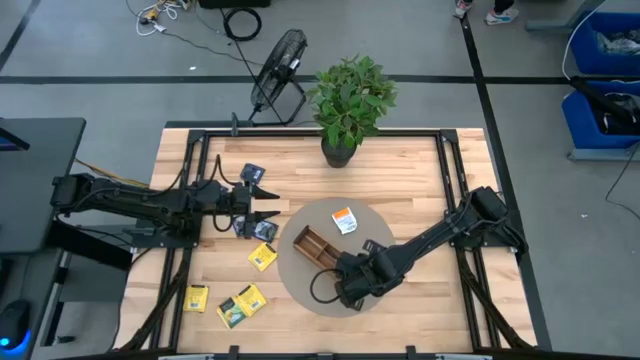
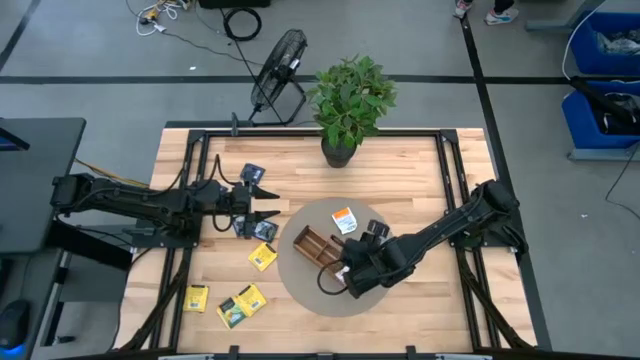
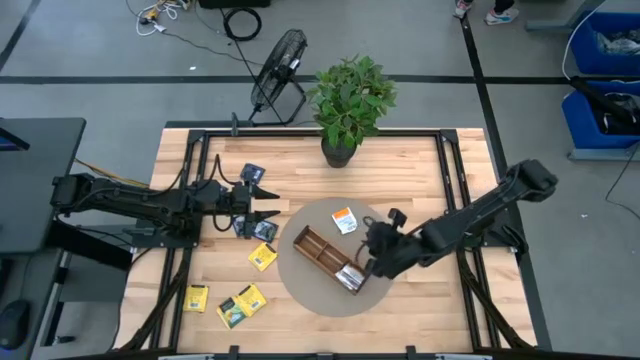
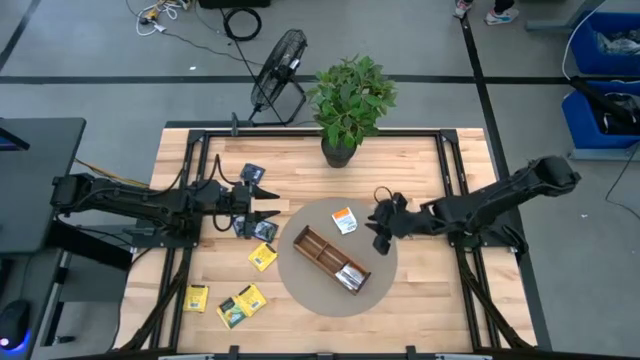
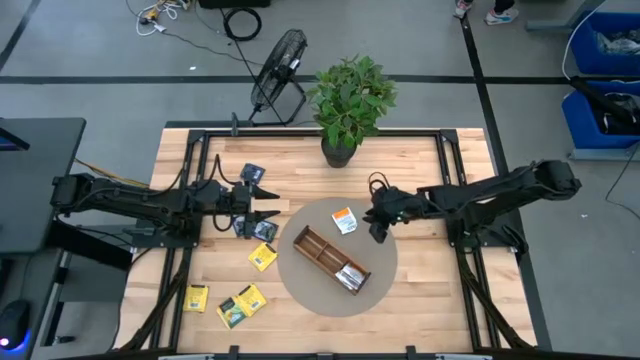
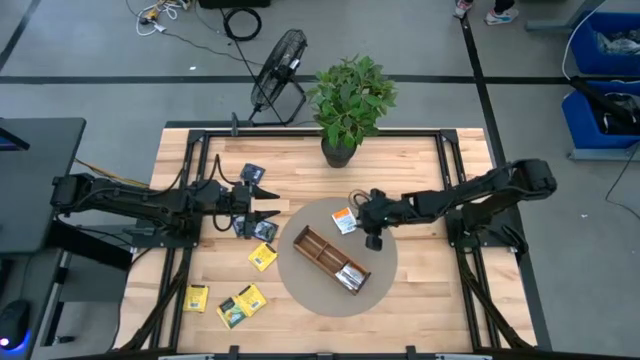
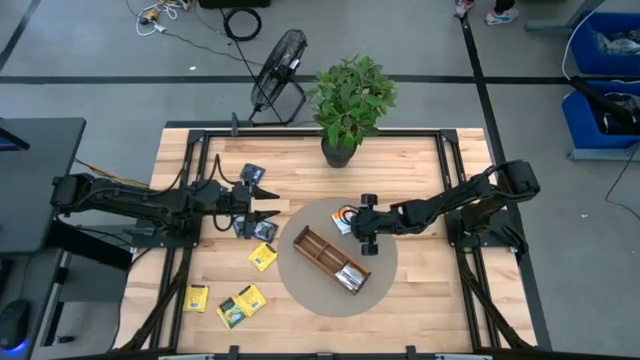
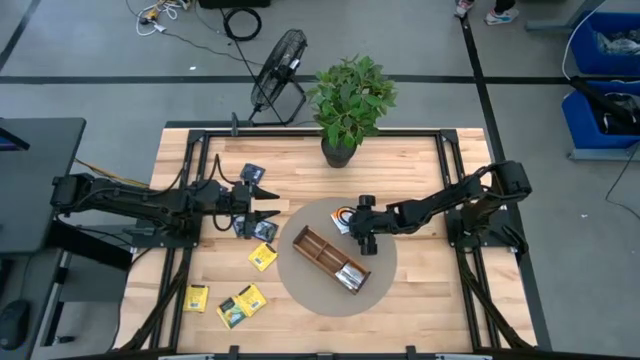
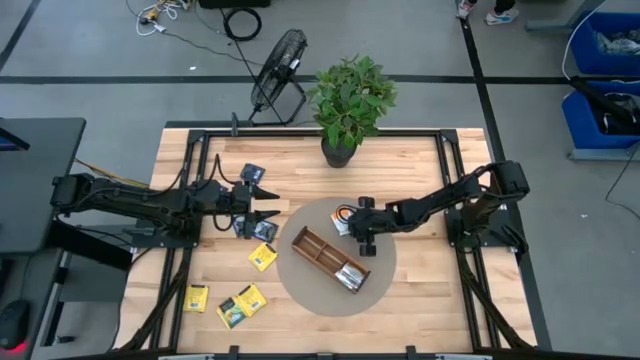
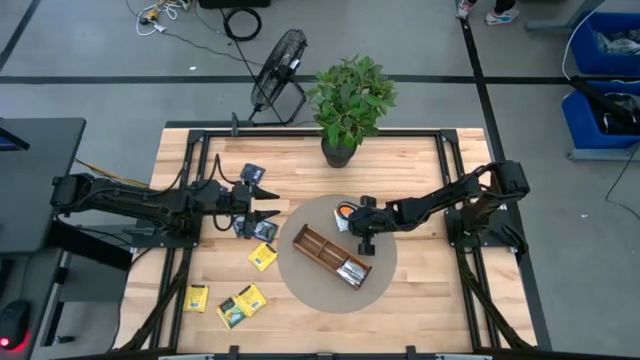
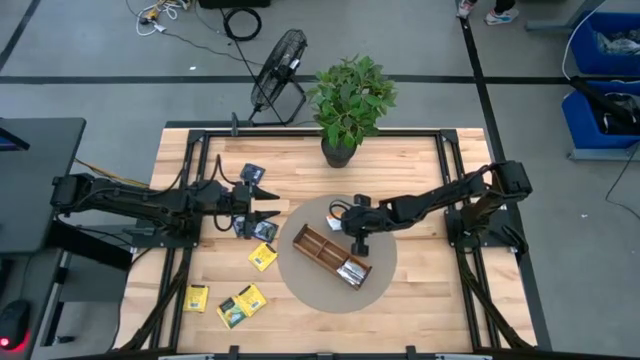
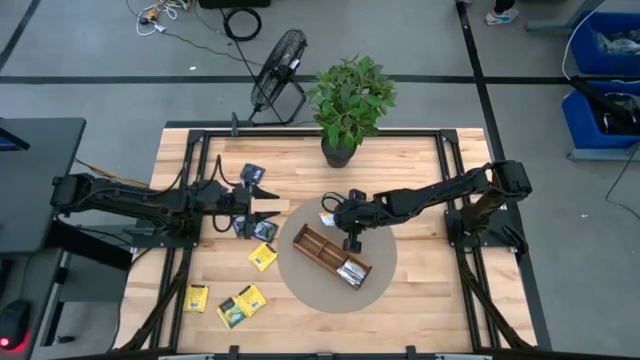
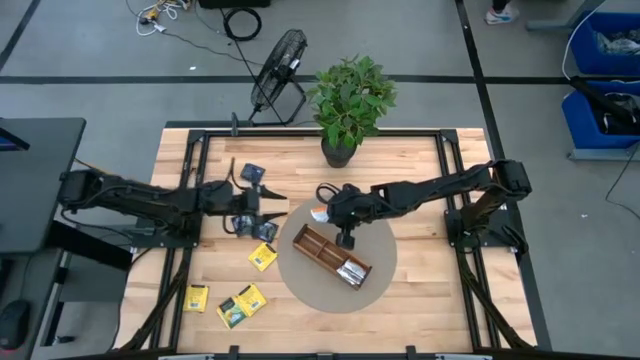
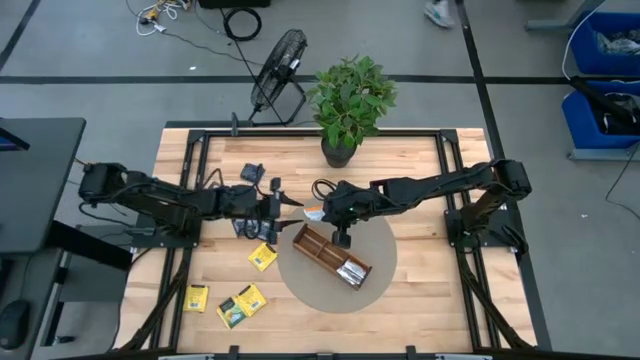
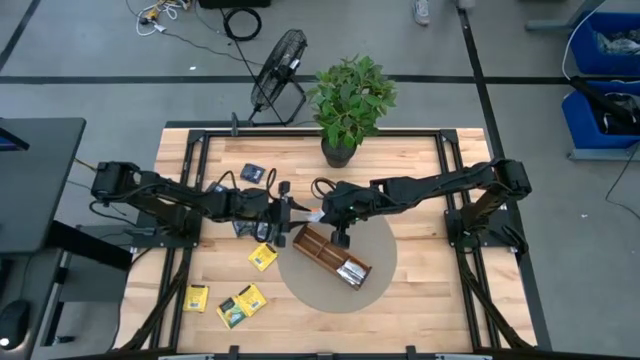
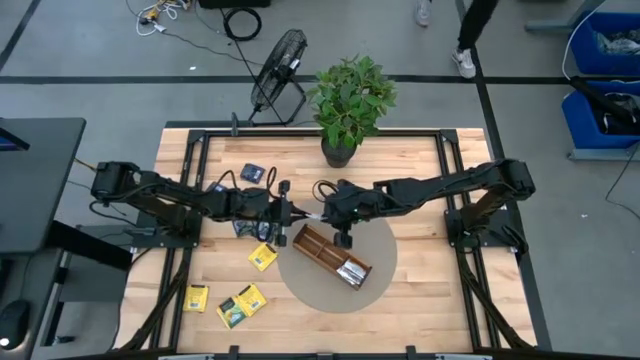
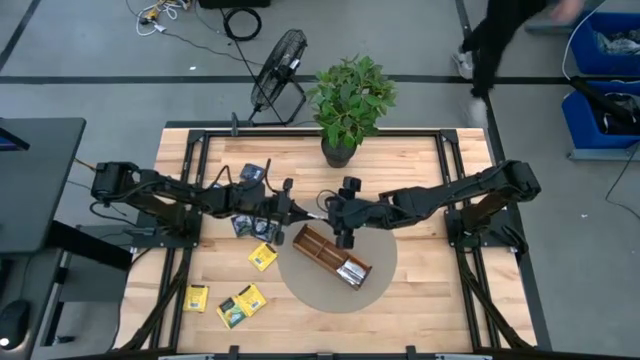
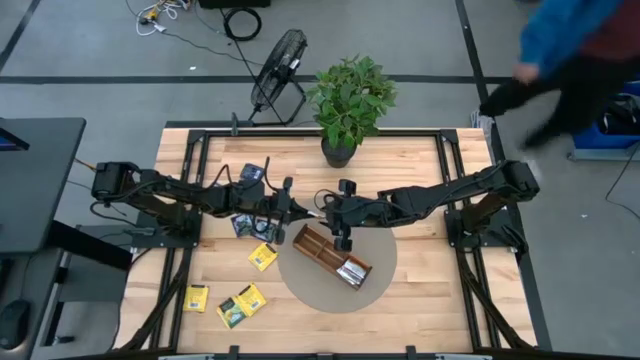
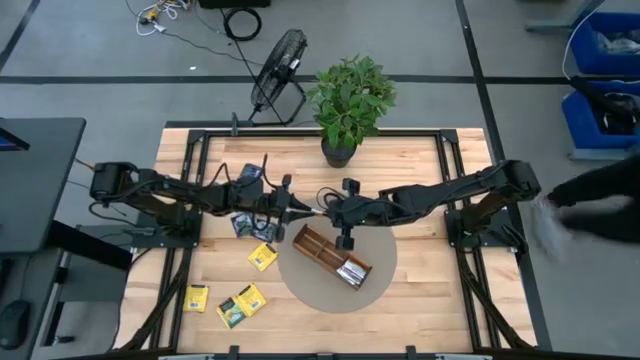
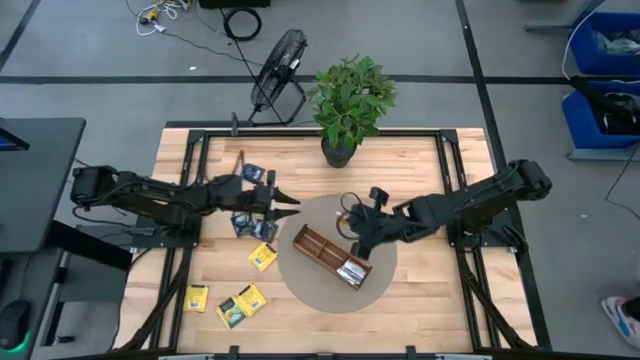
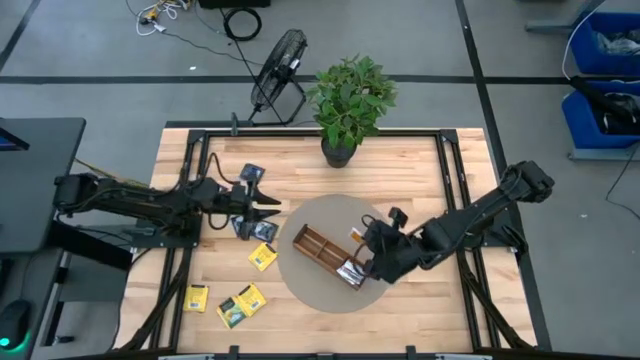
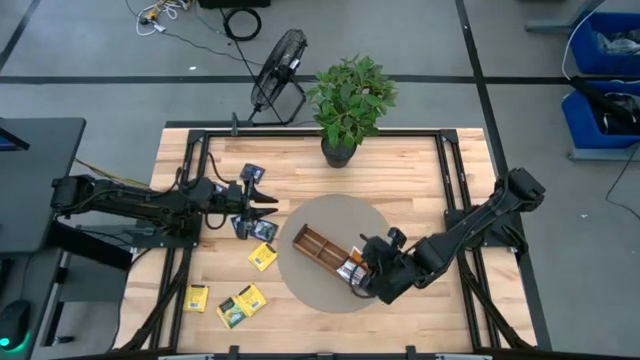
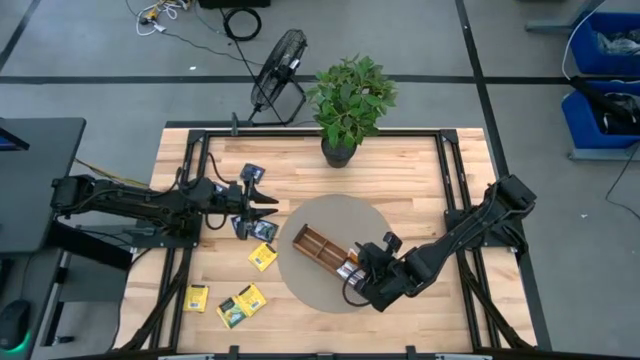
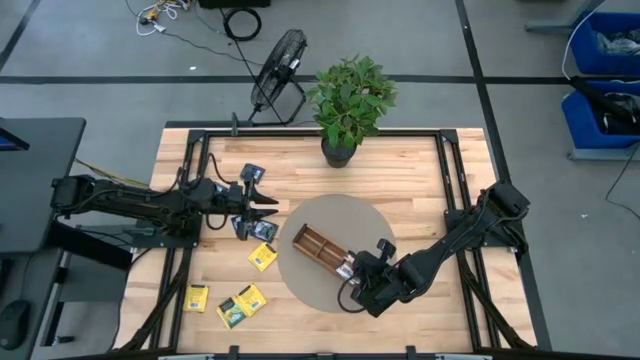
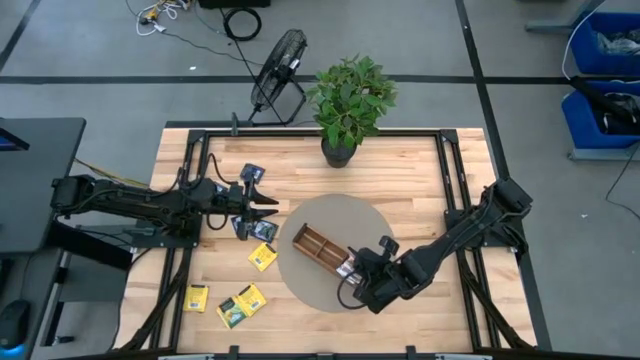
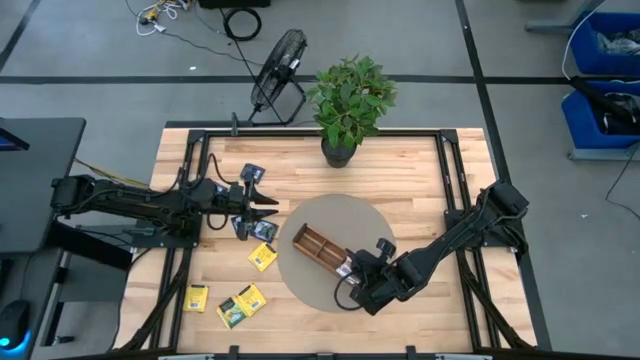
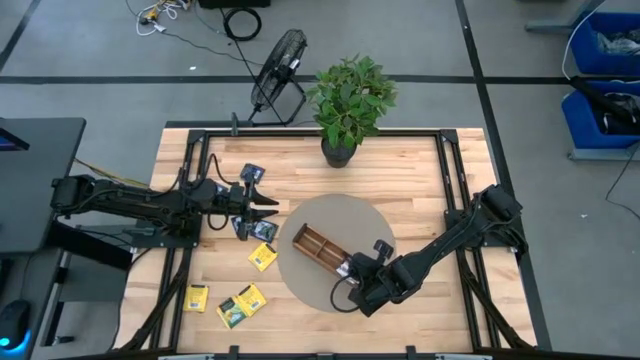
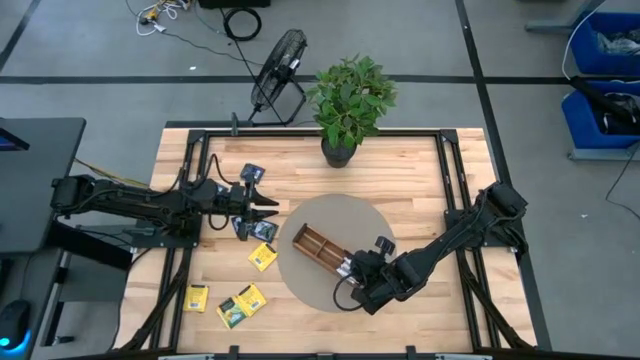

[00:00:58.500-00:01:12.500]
Task: Pick & Place Tea
Put the orange tea bag into the bottom section of the wooden organizer

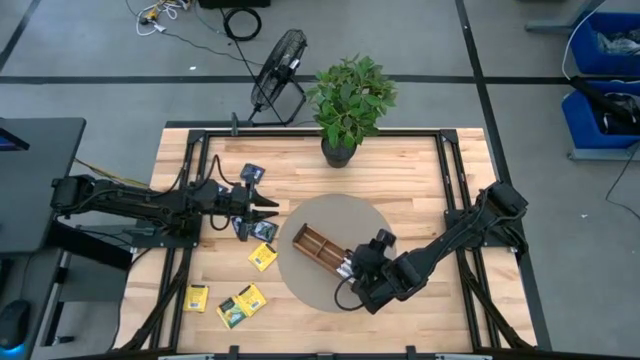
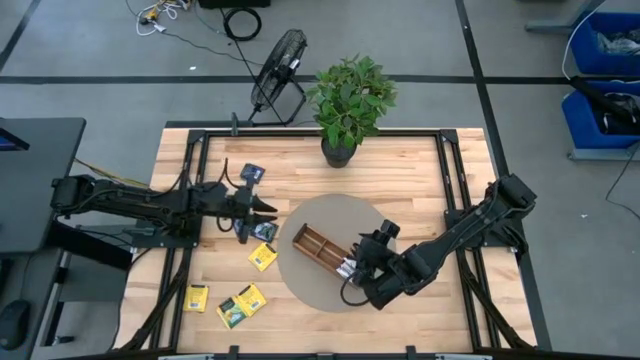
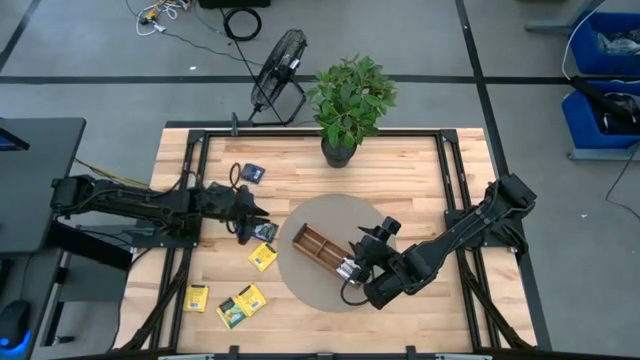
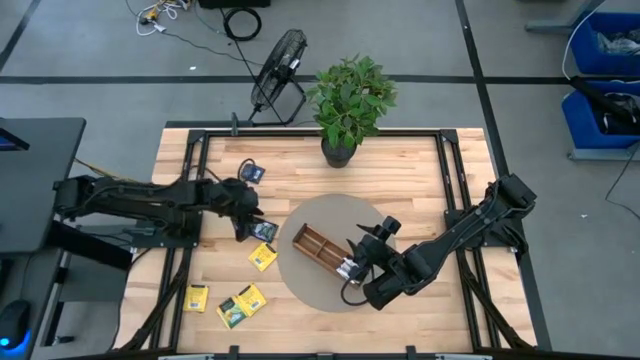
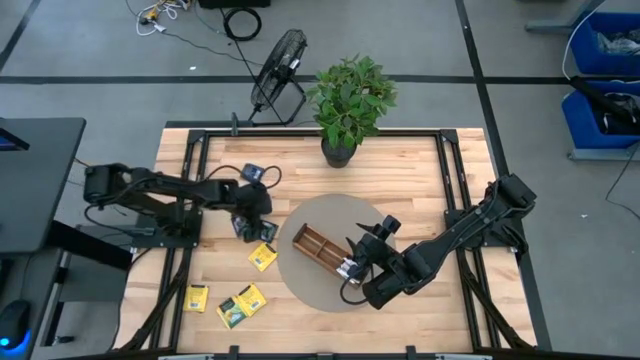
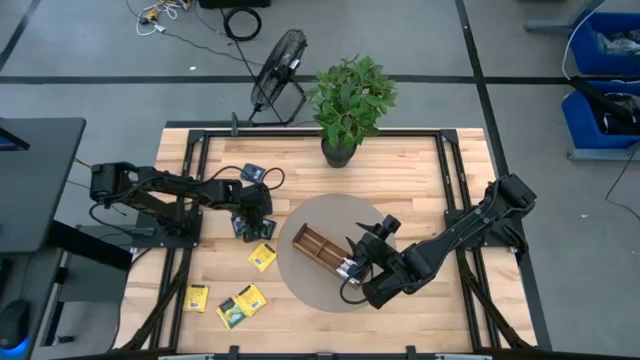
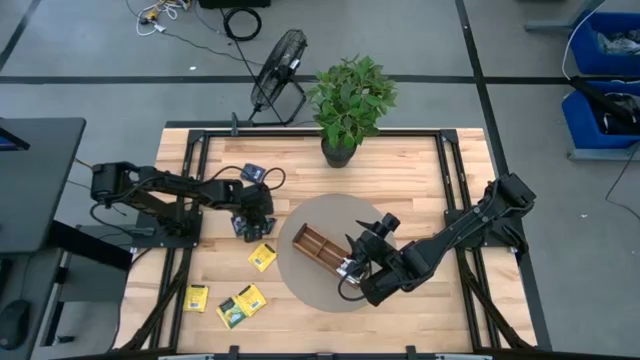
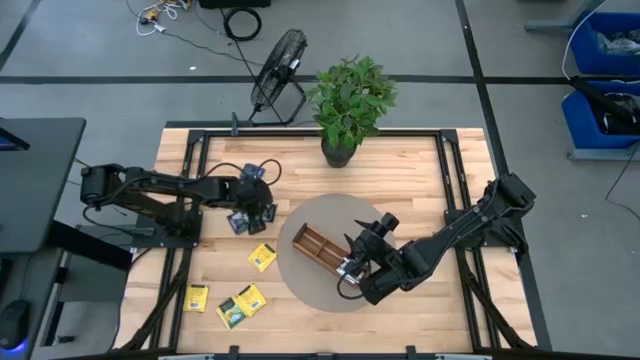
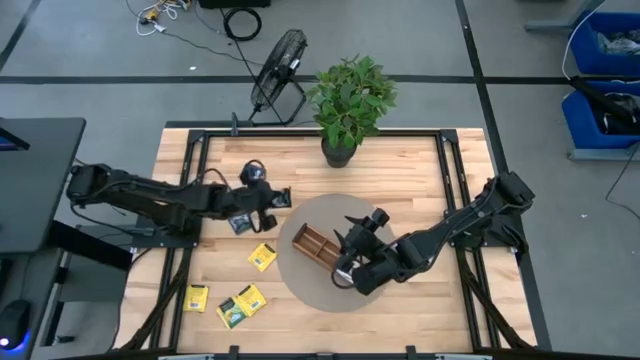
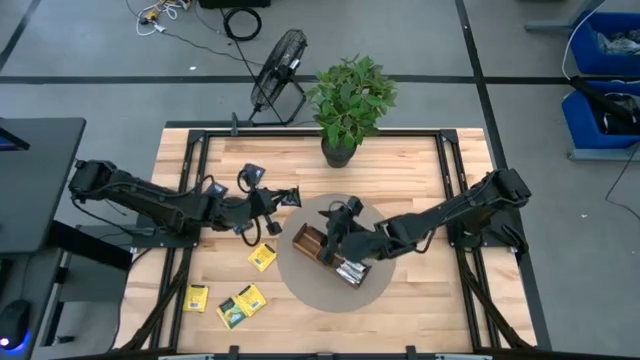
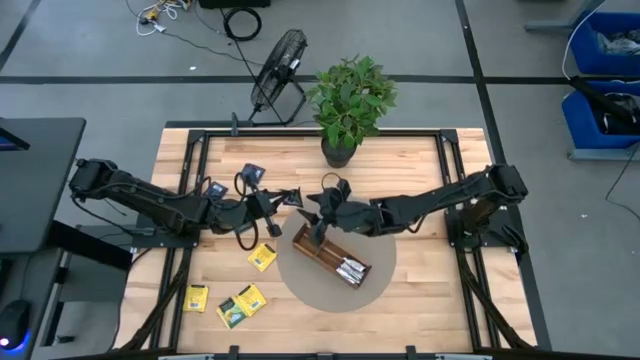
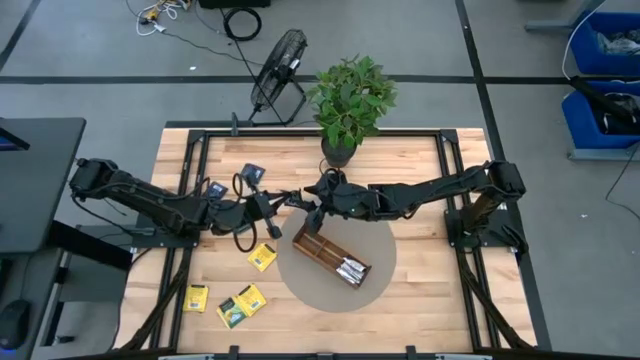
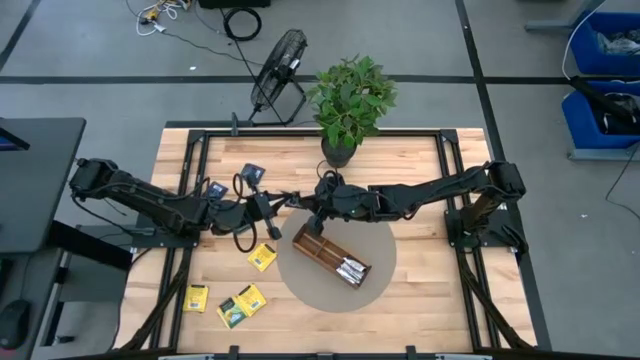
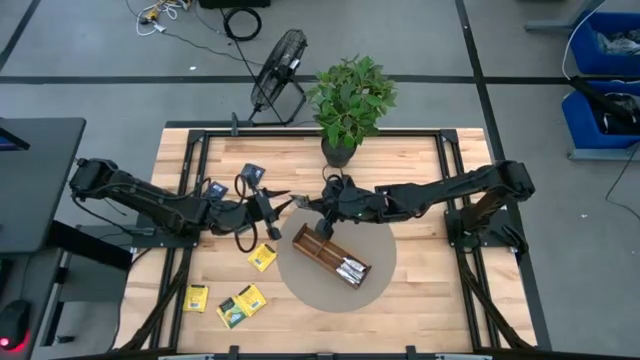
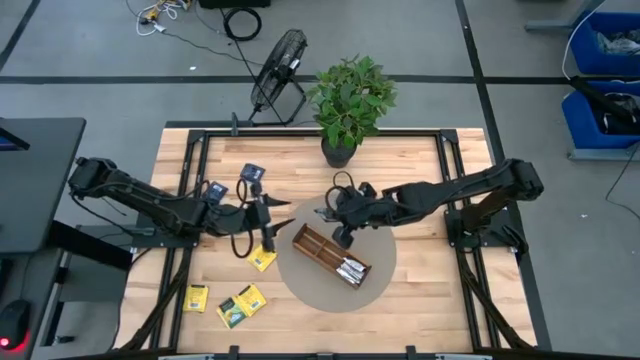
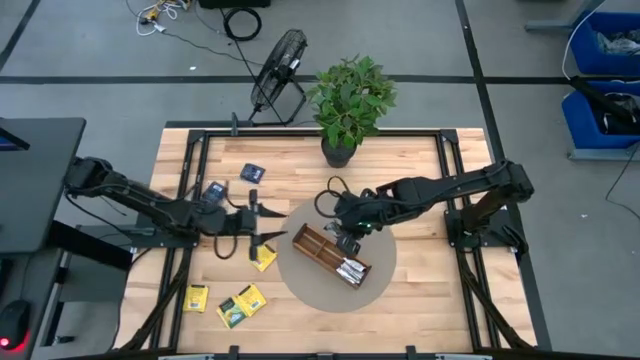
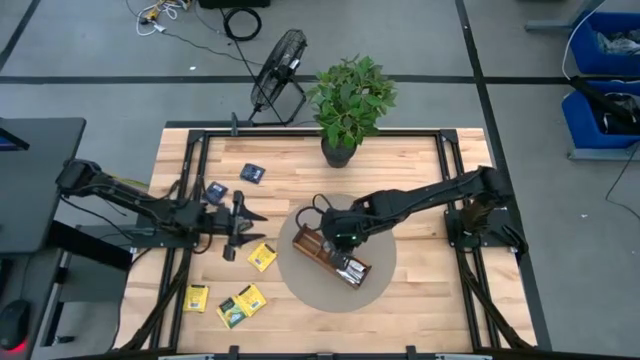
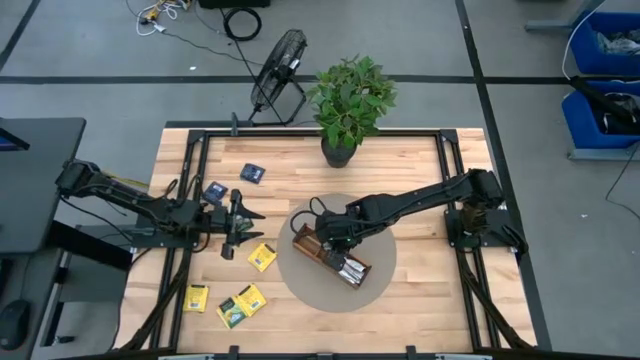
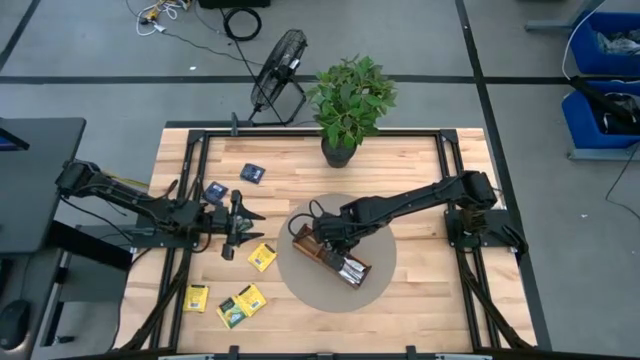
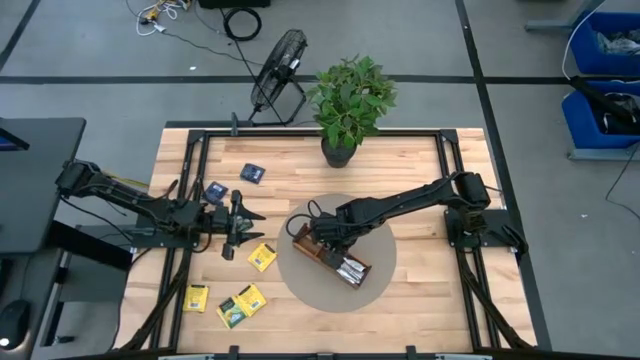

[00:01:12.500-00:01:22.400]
Put the purple tea bag into the middle section of the wooden organizer
